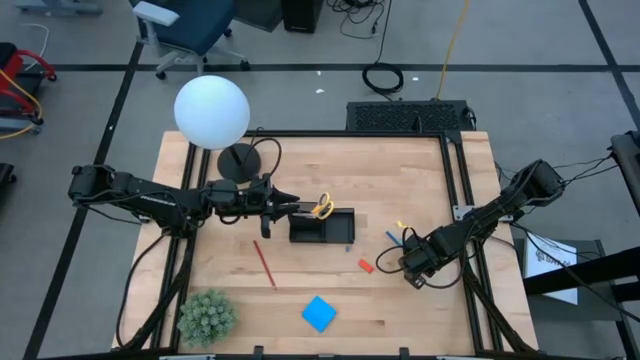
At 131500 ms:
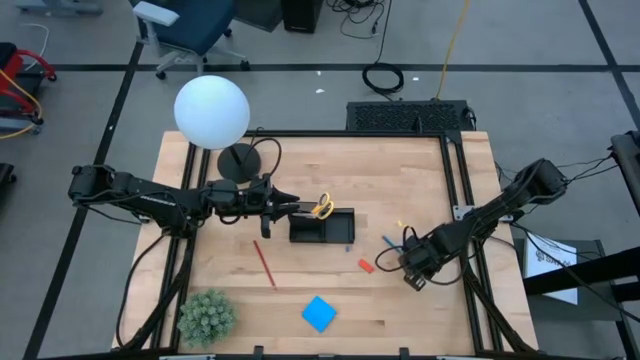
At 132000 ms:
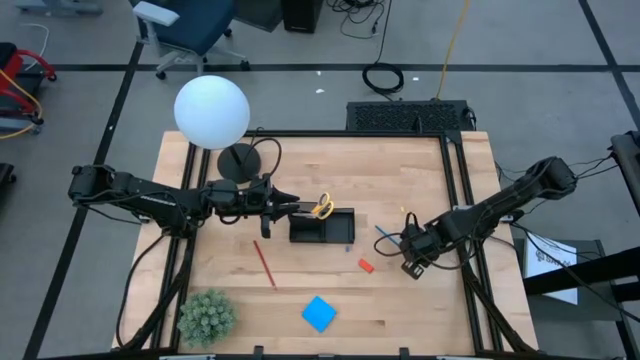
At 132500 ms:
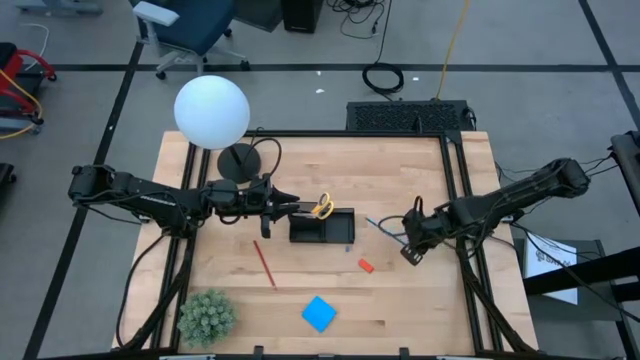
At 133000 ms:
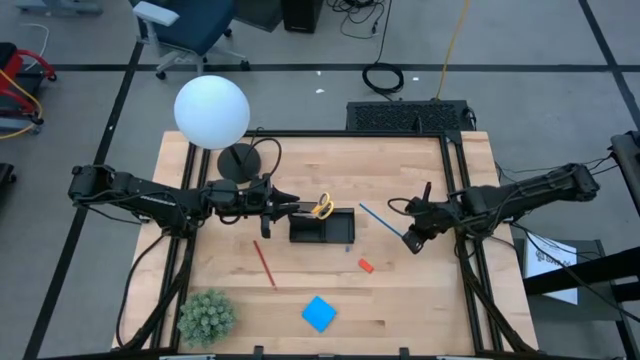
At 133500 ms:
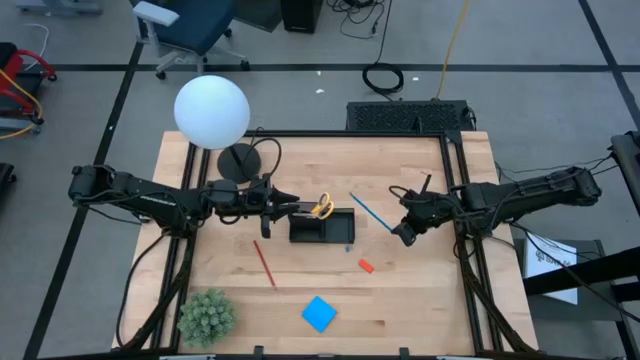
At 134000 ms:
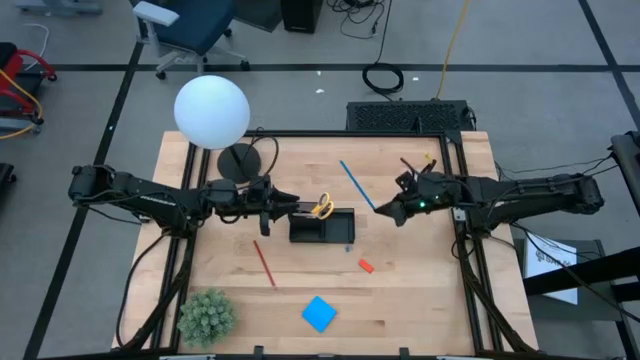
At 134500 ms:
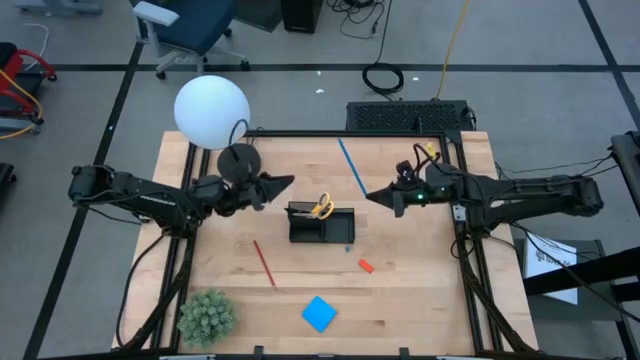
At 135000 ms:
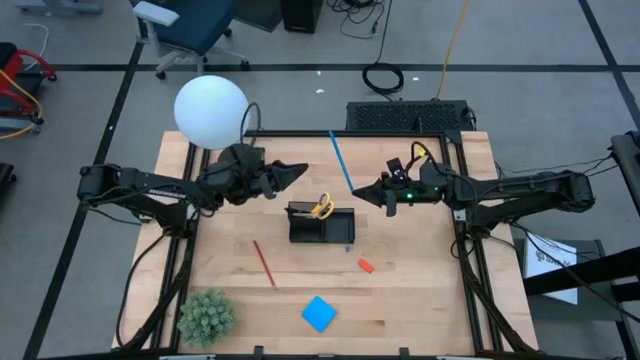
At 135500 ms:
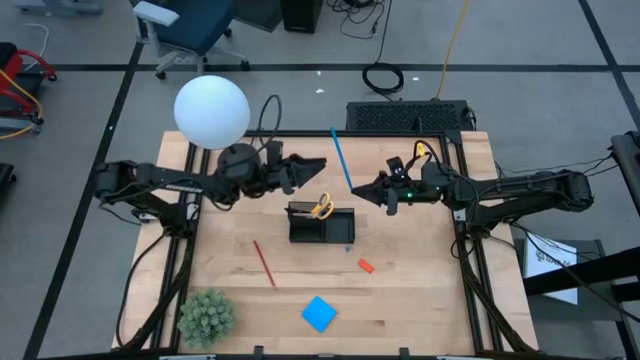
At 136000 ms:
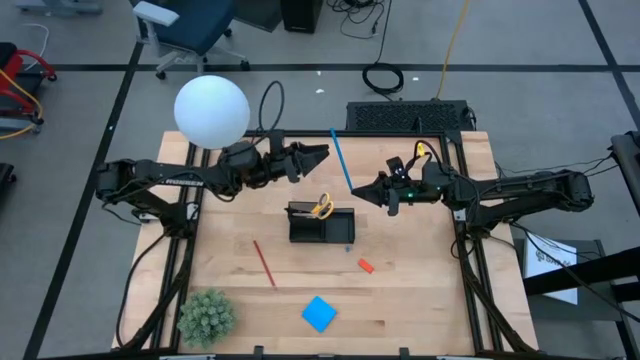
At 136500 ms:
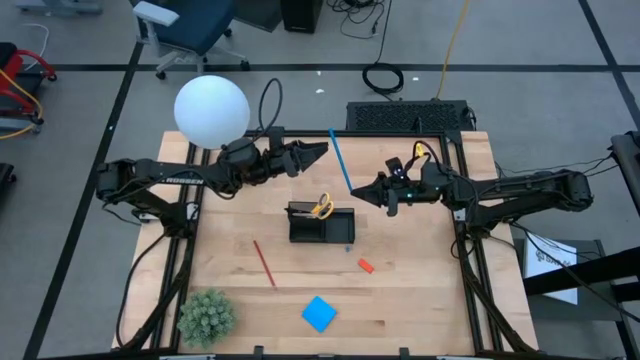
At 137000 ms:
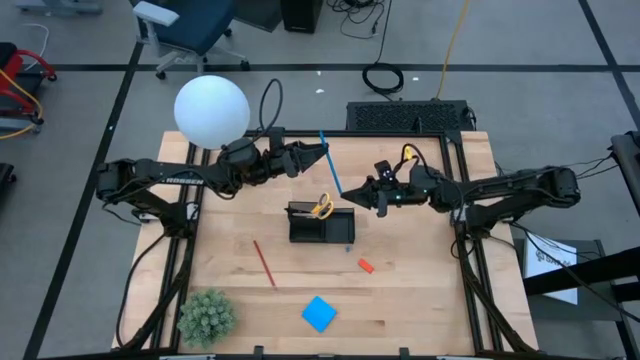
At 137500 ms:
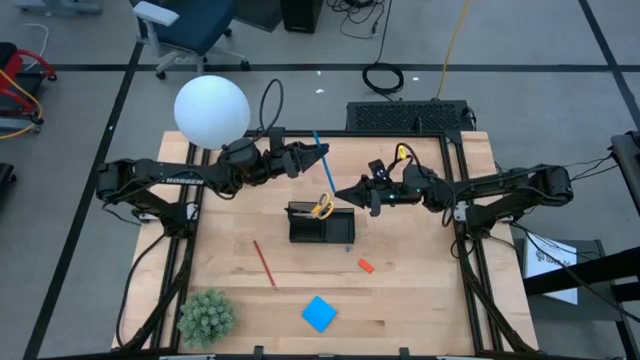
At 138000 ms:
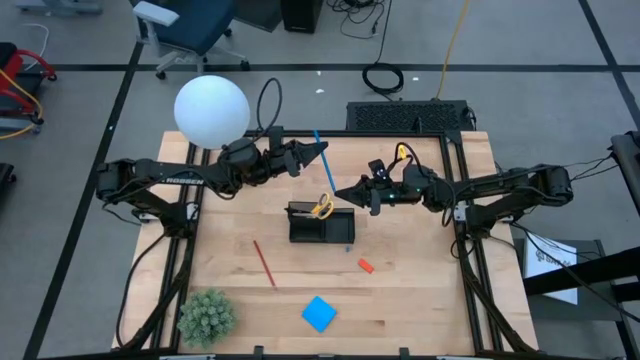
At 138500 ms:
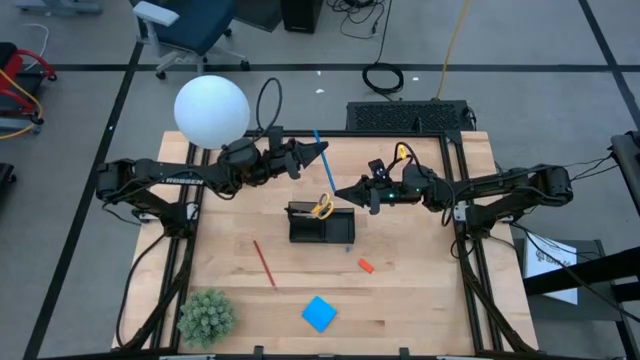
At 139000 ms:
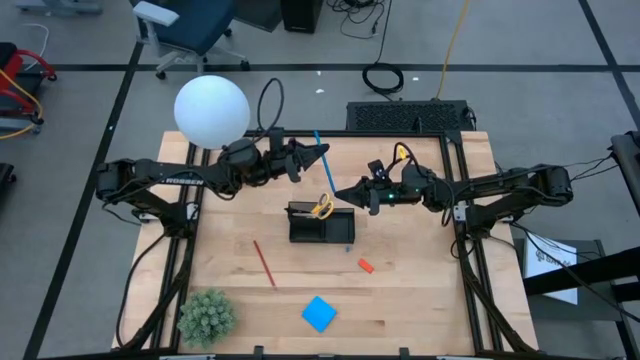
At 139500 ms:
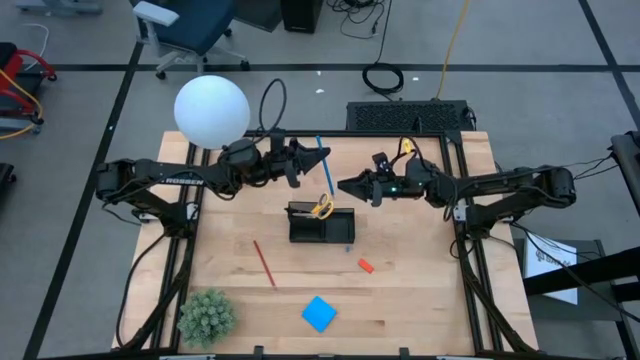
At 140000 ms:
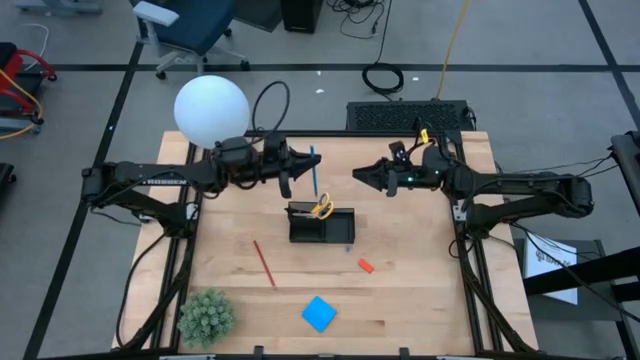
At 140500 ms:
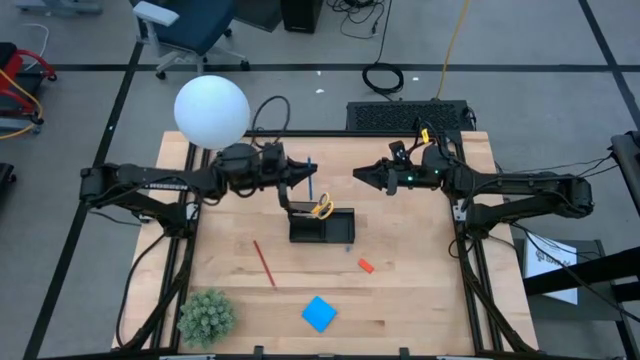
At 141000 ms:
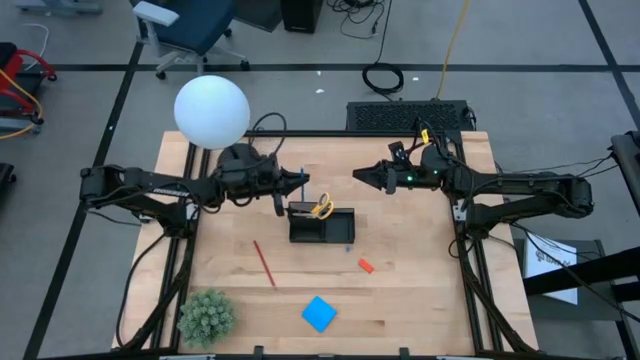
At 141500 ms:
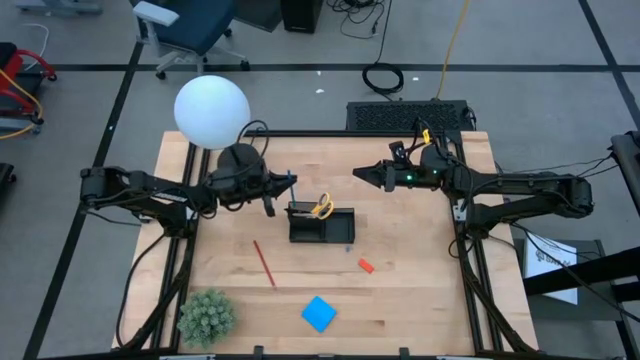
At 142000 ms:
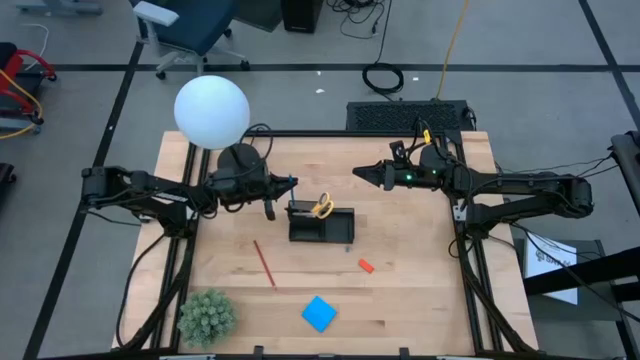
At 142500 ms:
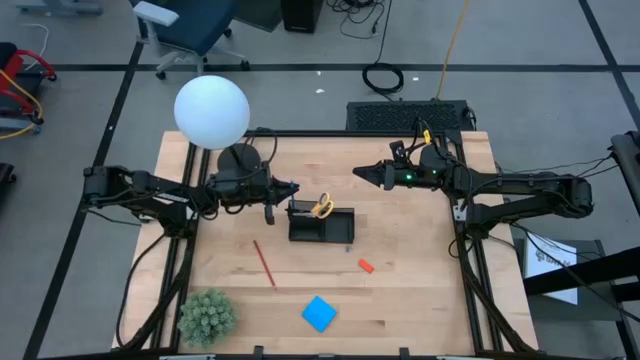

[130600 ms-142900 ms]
Task: Pick and place office supplies into organizer
Put the blue pencil into the desk organizer

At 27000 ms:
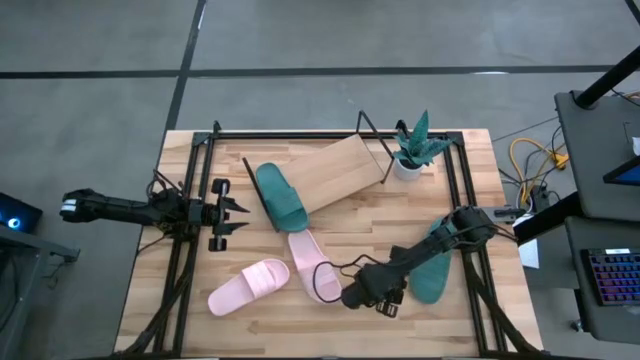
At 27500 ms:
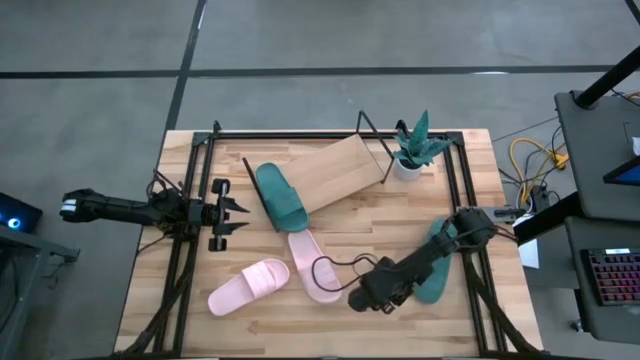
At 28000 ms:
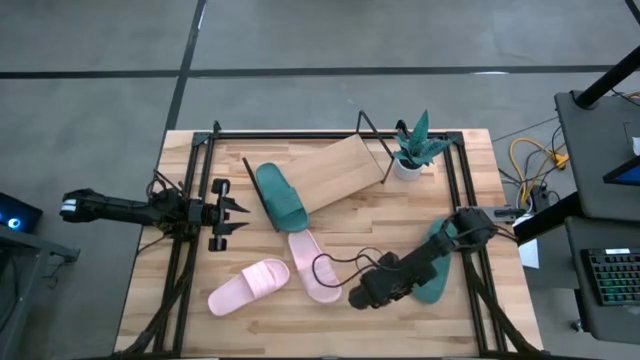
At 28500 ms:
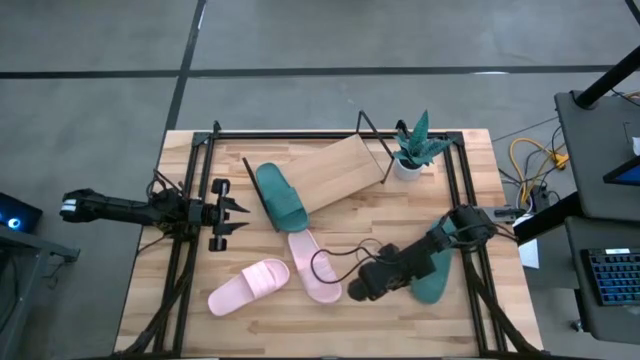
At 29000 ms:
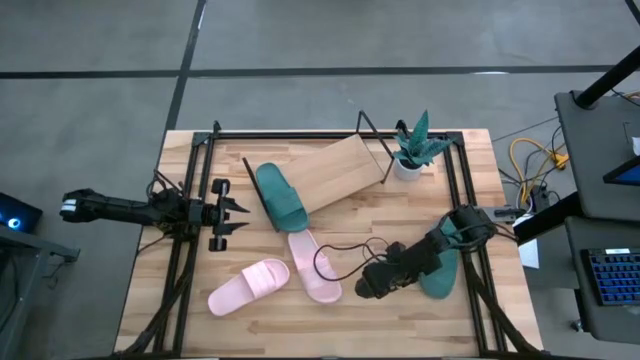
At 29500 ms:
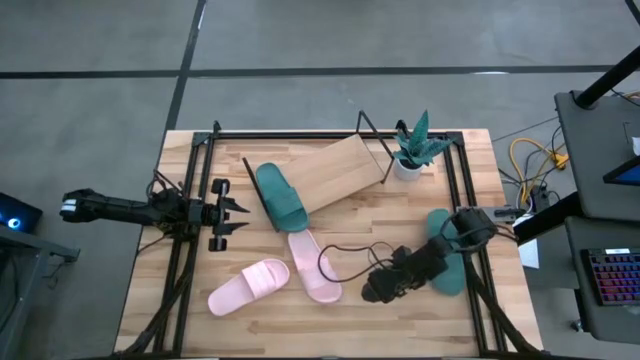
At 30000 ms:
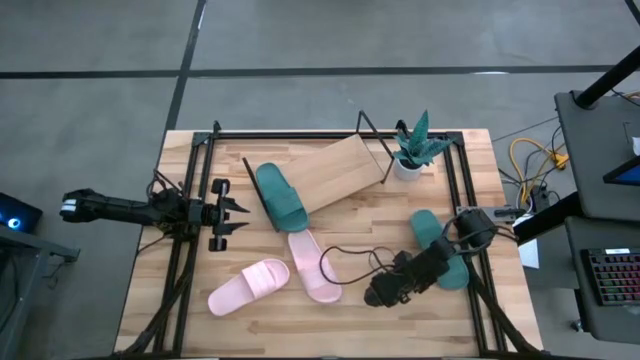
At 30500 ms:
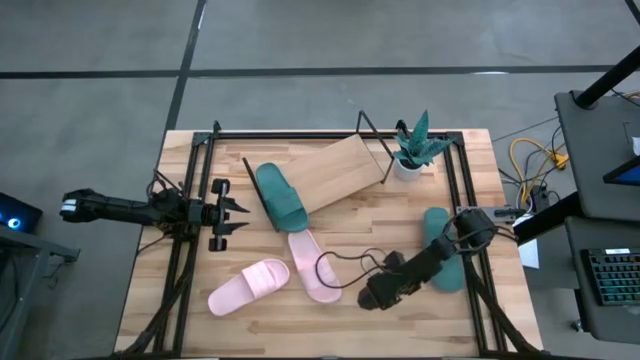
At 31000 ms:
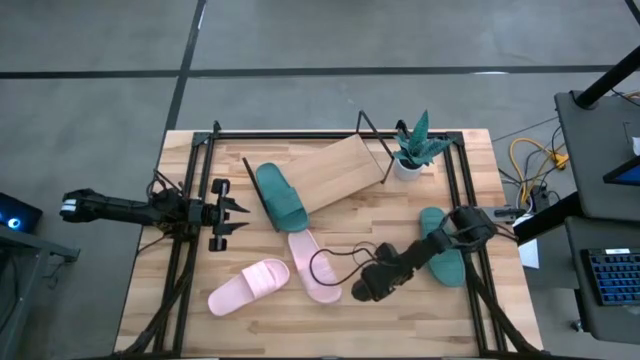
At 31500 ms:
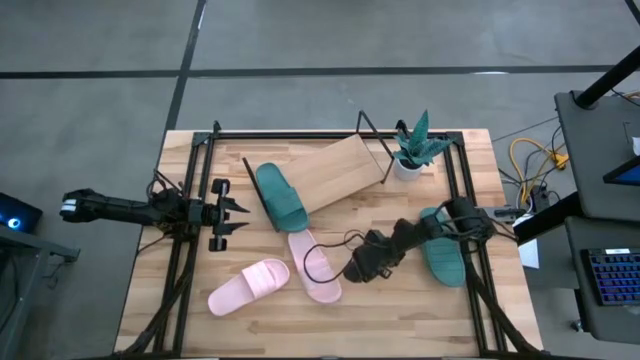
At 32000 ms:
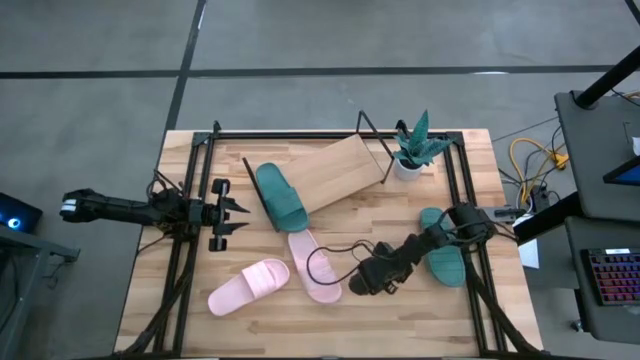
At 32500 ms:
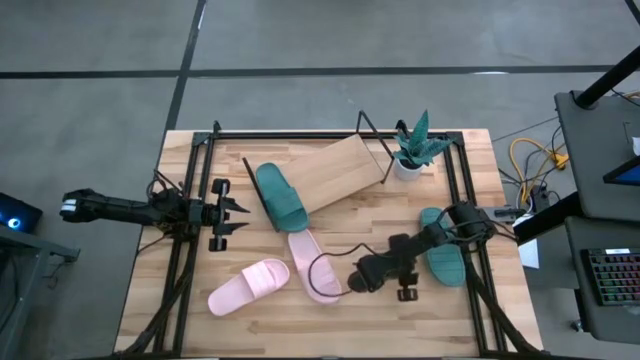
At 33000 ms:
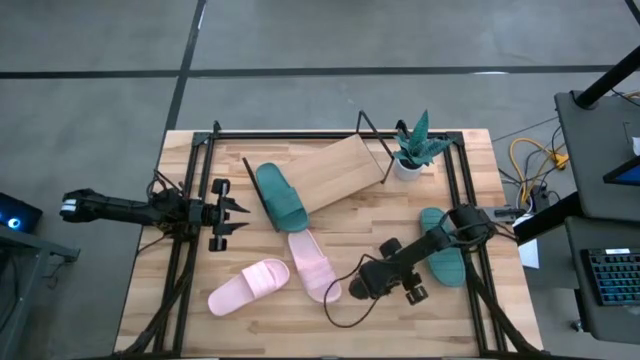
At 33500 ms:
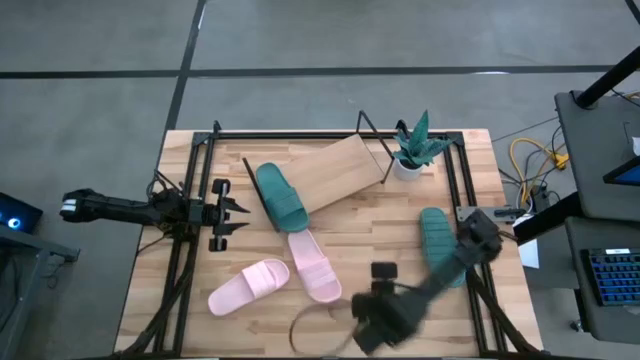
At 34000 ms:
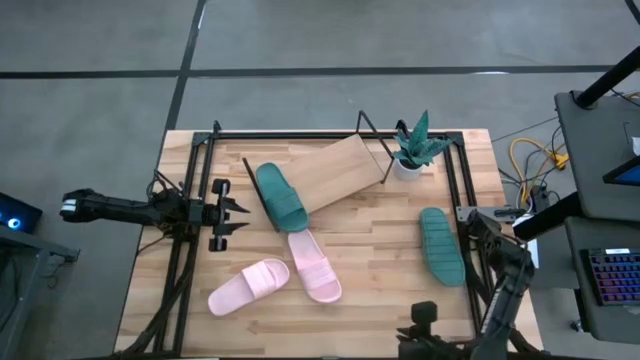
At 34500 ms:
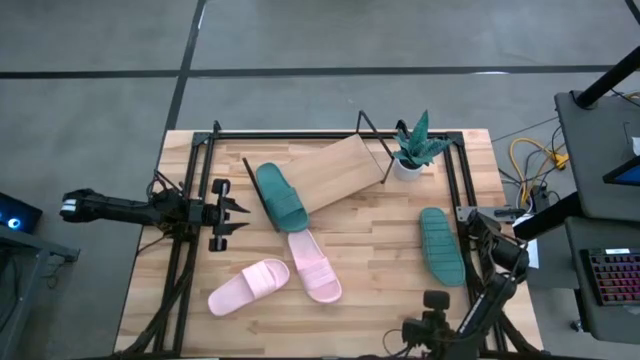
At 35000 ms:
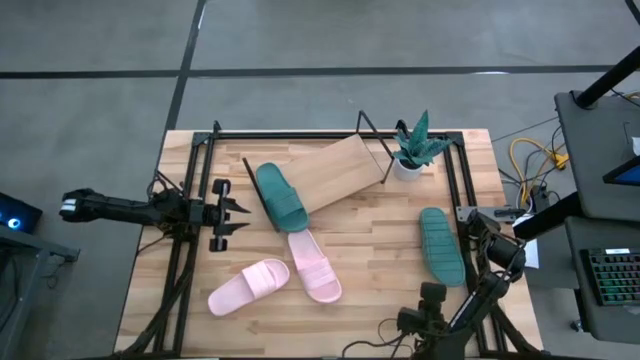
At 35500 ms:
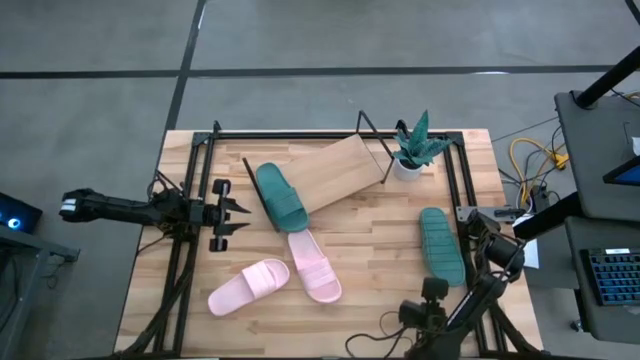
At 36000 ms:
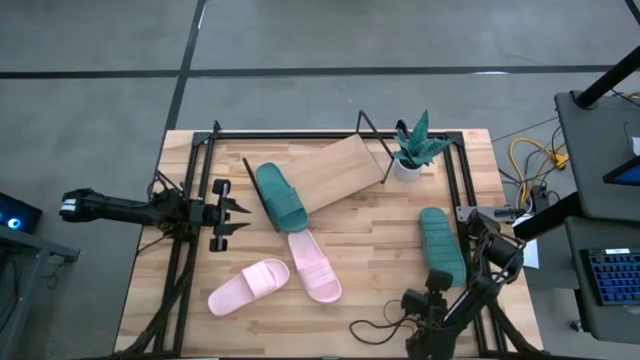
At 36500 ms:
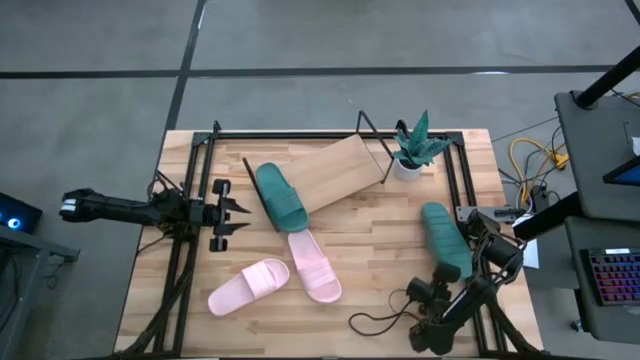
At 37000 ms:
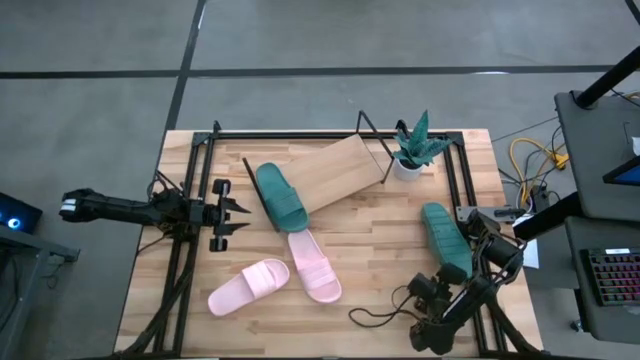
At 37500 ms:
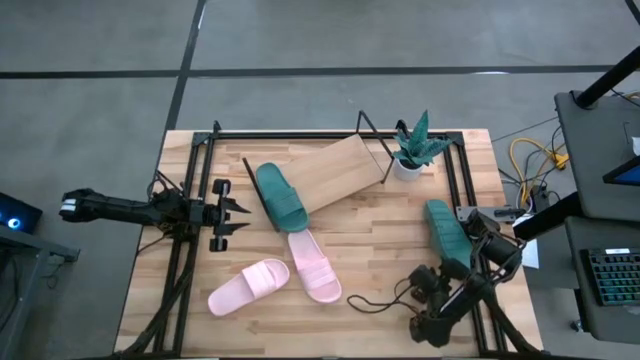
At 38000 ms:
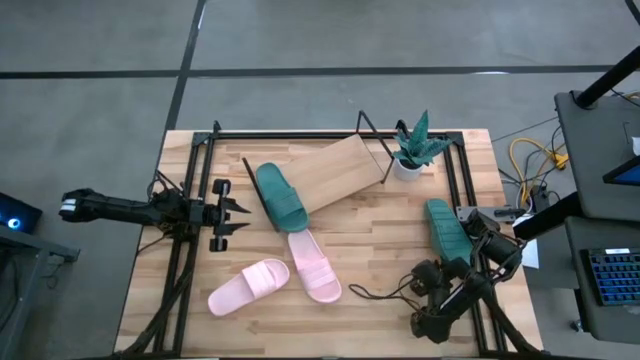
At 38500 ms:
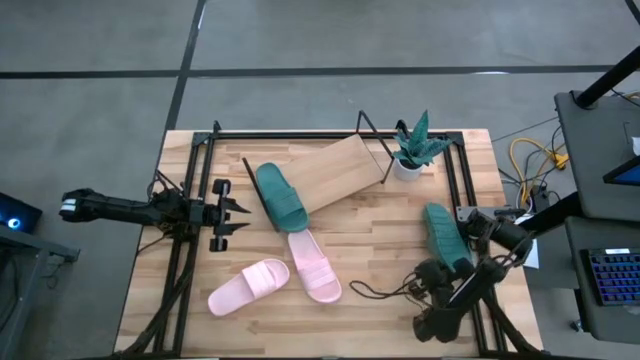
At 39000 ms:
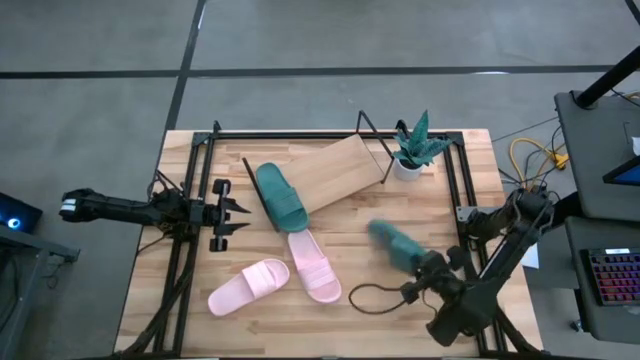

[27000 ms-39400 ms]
Task: Pick and place slides into the shelf
Put the green slide on the shelf
